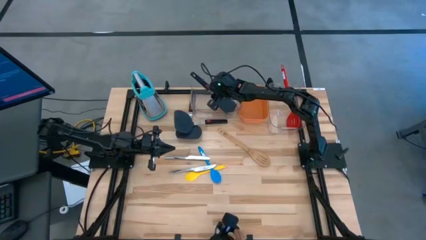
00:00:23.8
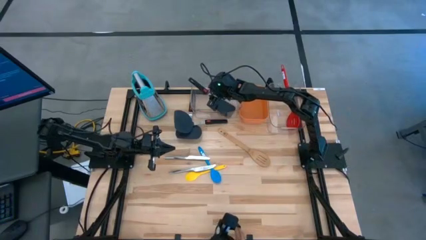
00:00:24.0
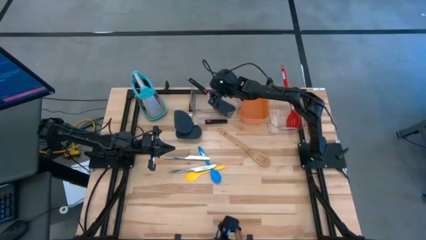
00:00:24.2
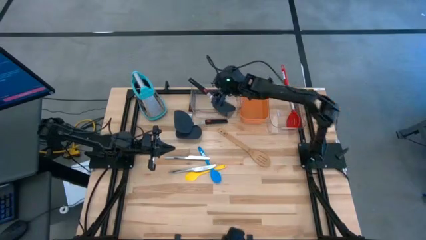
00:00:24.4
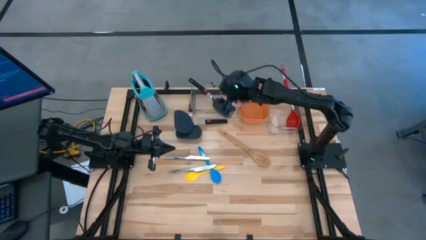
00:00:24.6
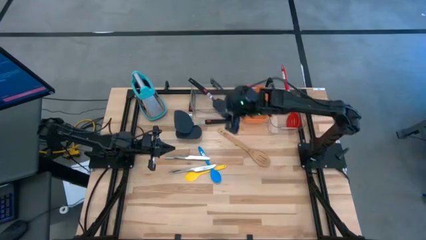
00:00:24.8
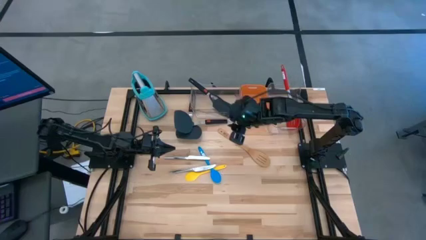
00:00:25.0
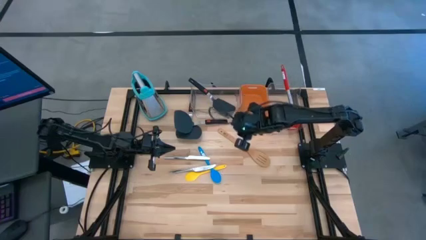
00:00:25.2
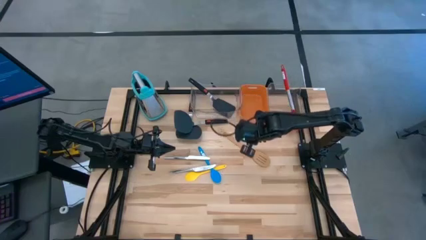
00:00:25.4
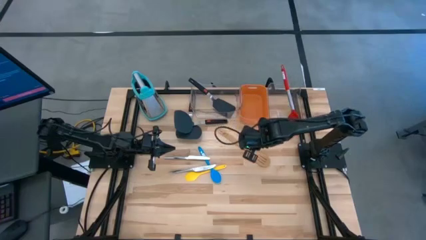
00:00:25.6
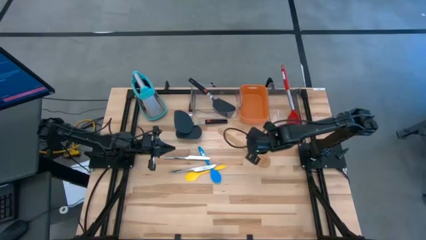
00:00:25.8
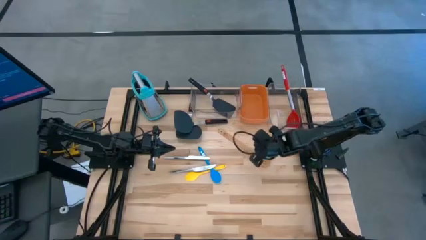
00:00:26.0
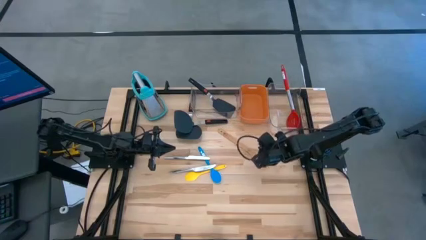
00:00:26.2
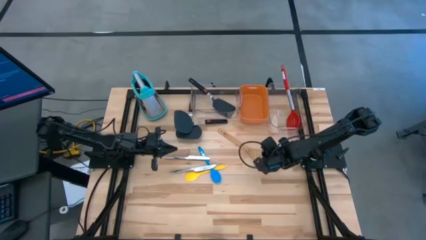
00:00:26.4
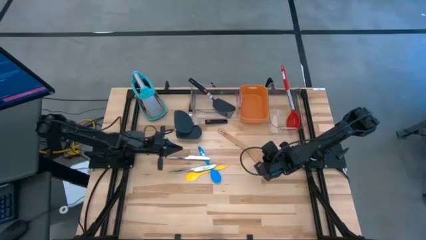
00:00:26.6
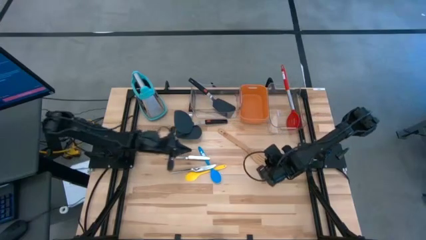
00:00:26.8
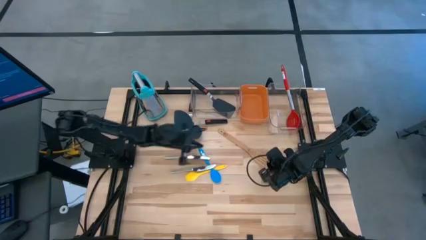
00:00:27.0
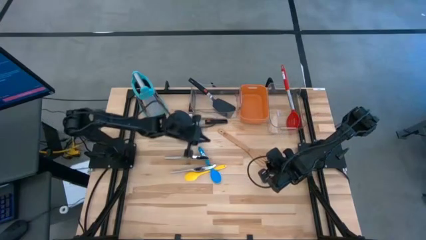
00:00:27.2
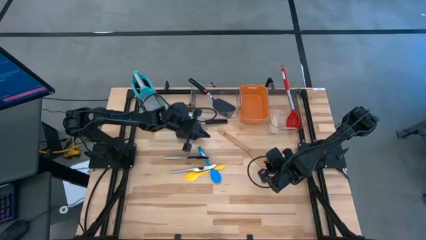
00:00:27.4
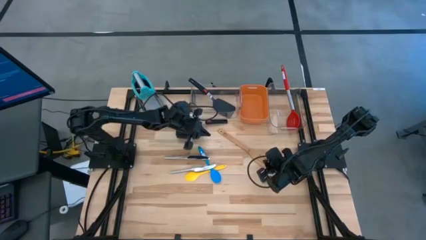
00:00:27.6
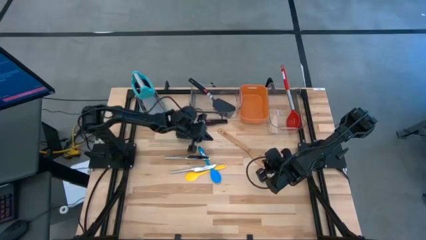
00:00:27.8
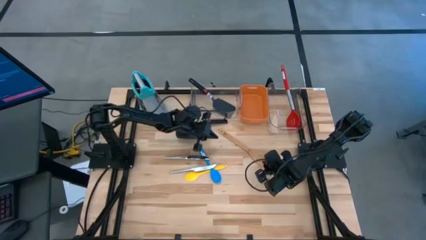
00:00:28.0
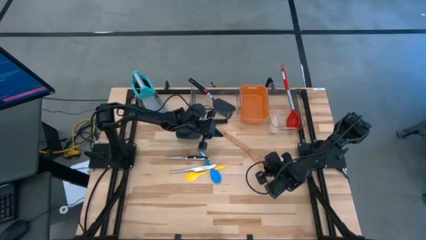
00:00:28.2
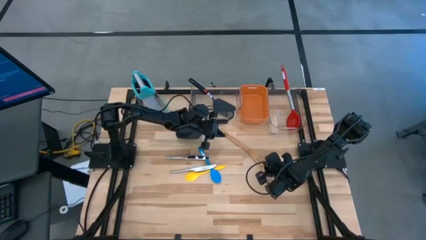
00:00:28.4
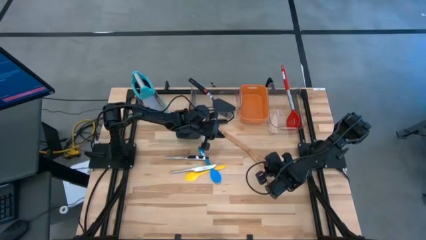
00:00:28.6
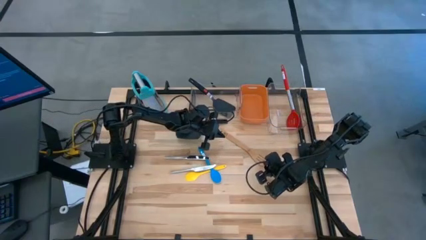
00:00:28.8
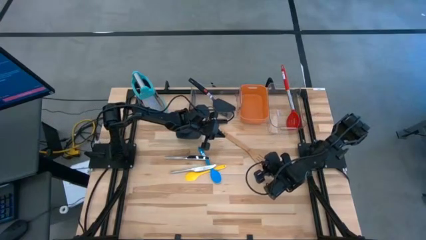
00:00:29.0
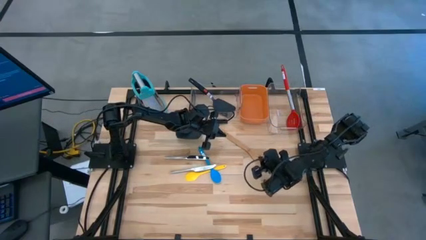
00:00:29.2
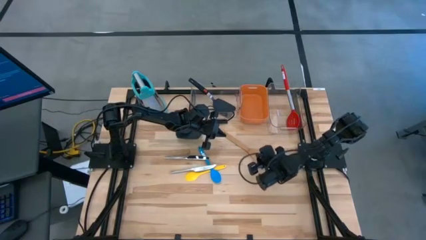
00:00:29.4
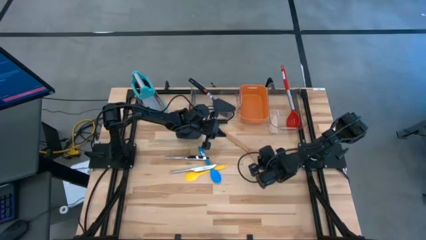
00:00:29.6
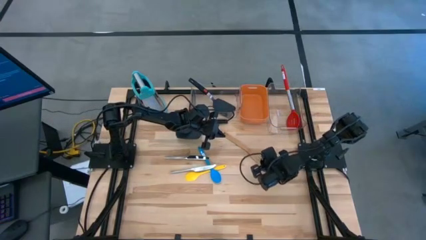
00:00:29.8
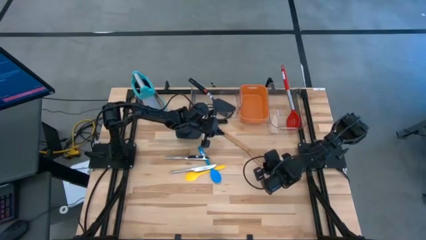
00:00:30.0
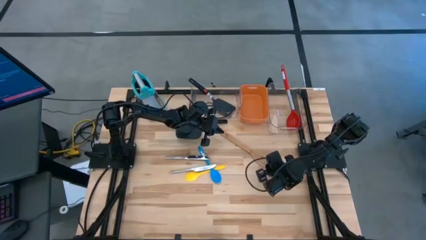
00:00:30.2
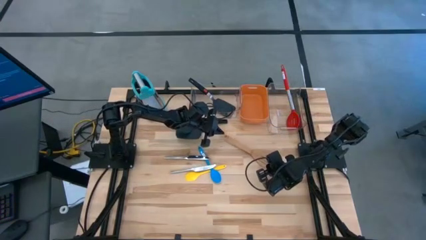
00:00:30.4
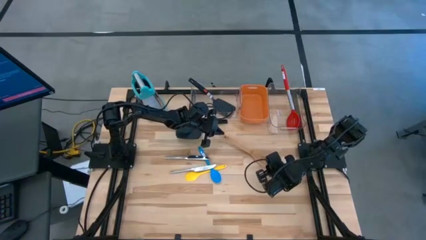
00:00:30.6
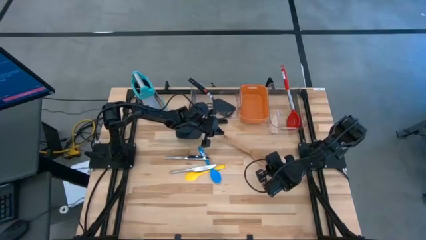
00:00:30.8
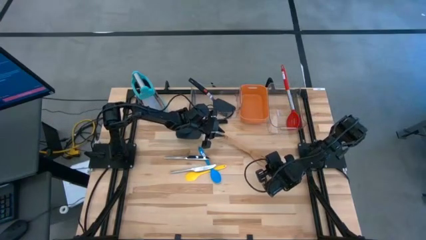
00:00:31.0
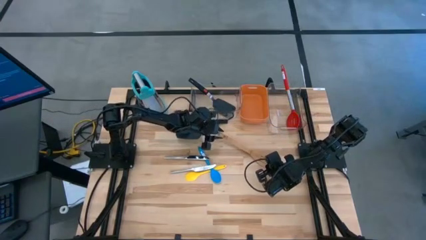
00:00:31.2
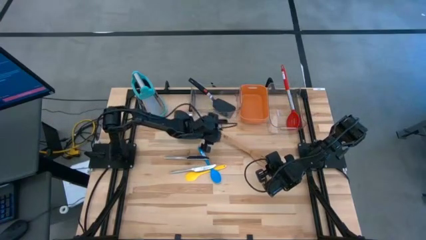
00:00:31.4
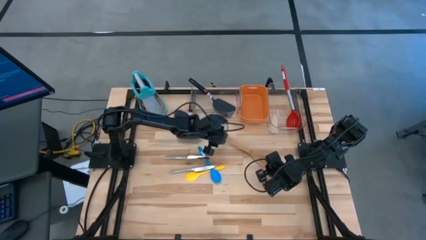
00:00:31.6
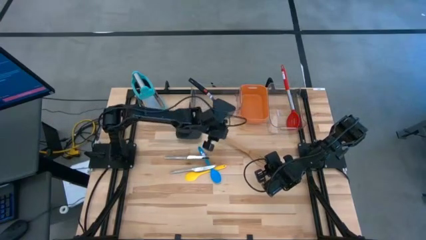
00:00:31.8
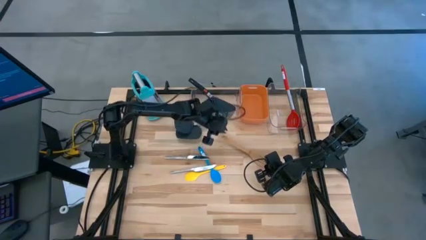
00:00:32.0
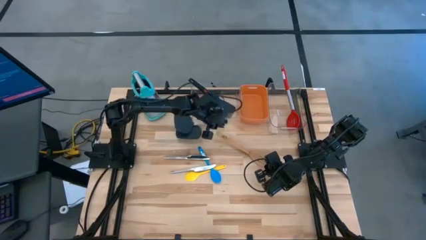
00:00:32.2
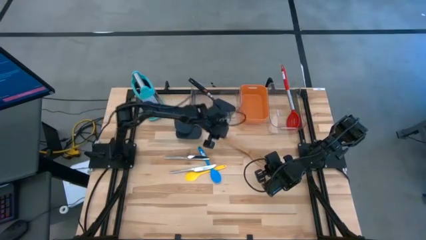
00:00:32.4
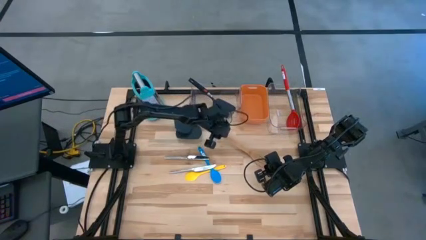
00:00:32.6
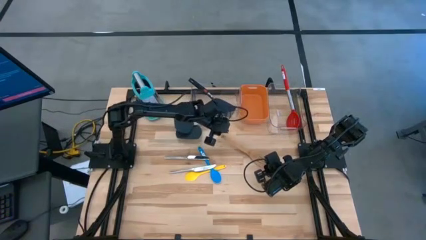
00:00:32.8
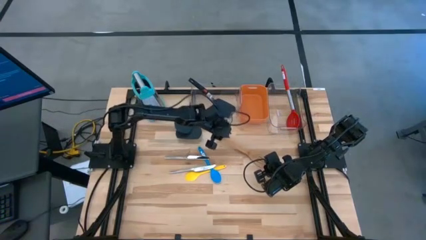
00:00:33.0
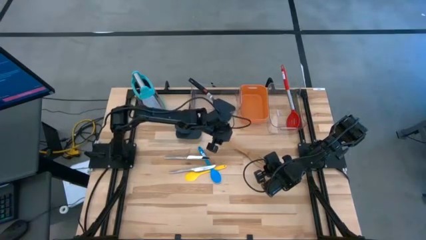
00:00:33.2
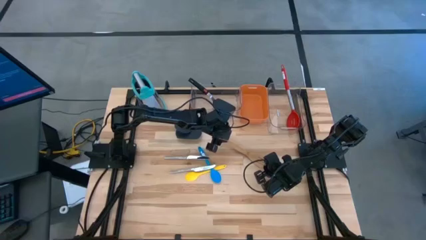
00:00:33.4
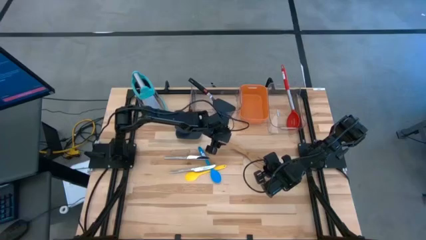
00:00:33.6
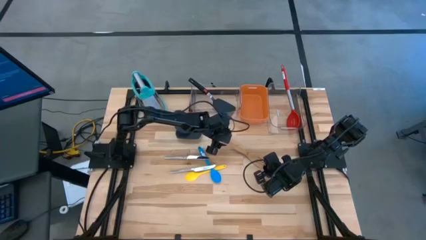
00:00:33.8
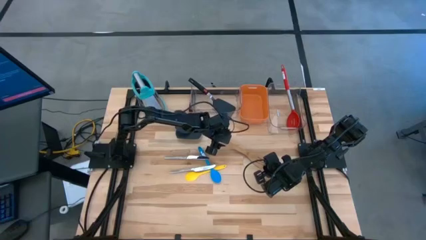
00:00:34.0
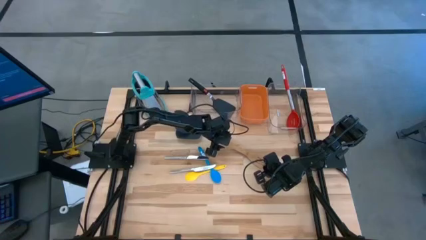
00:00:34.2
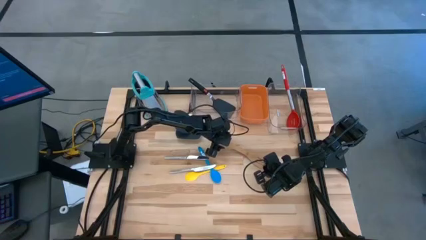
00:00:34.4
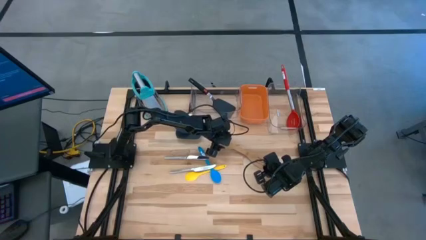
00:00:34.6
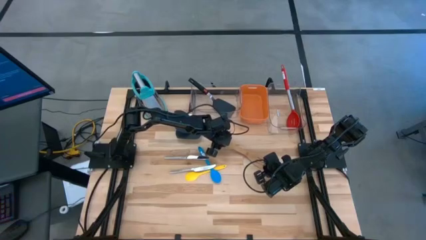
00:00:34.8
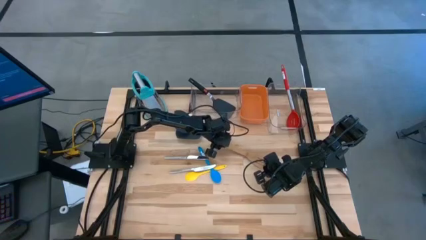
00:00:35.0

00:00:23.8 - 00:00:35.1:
Task: Pick & Place Kitchen Items
Put the wooden spatula in the right transparent bin
